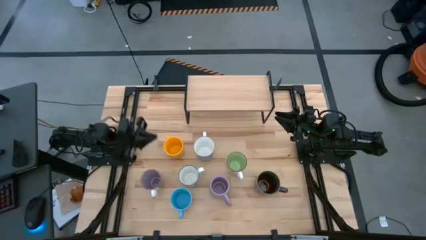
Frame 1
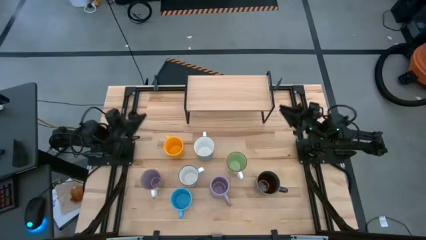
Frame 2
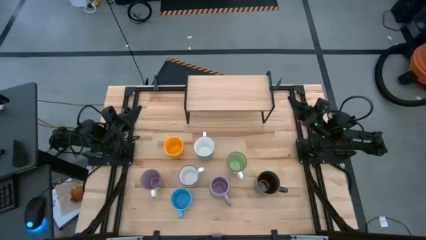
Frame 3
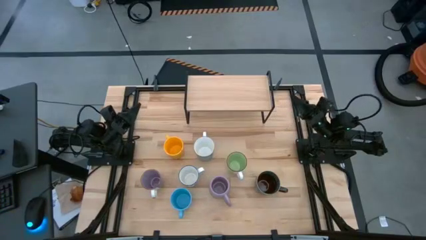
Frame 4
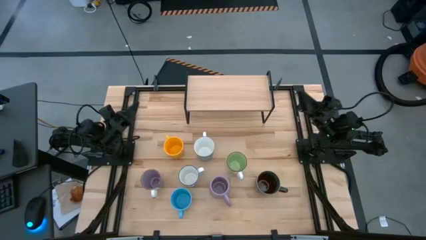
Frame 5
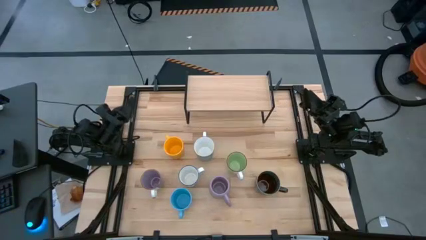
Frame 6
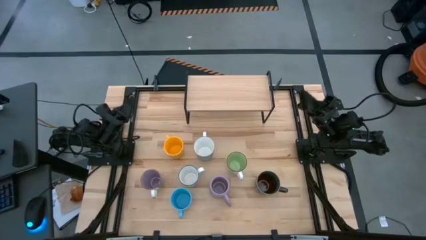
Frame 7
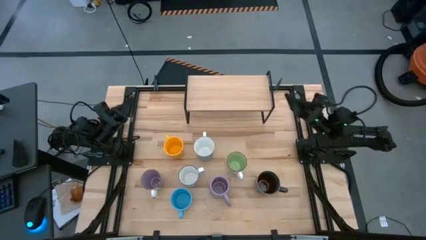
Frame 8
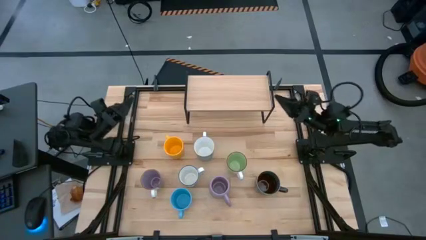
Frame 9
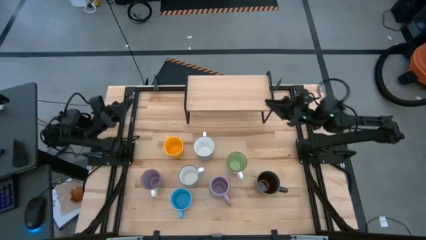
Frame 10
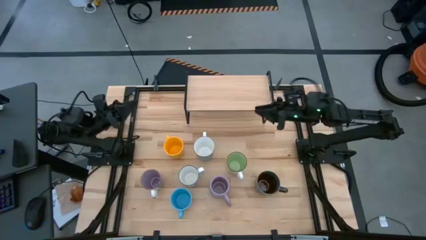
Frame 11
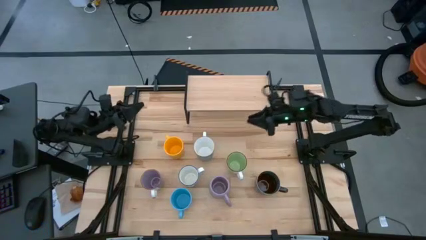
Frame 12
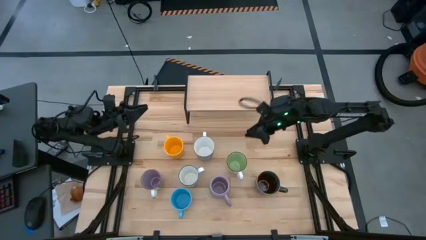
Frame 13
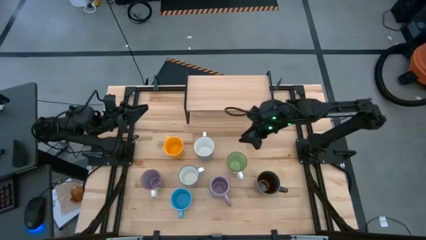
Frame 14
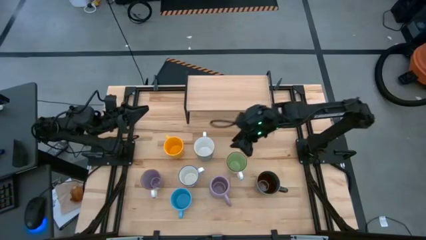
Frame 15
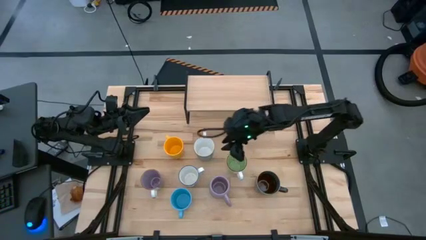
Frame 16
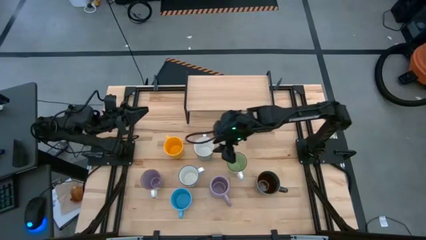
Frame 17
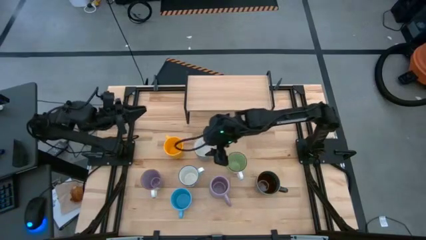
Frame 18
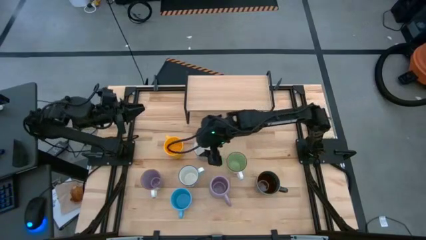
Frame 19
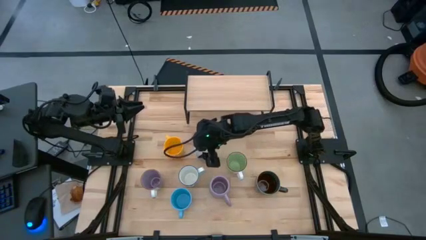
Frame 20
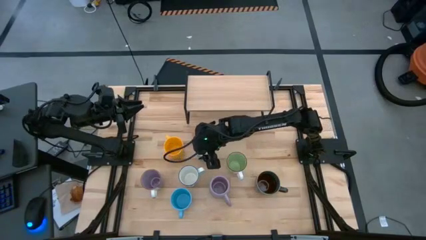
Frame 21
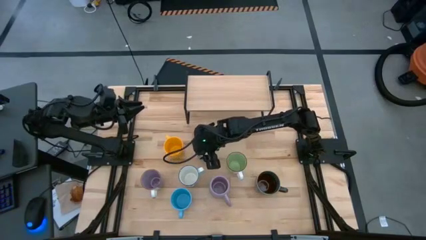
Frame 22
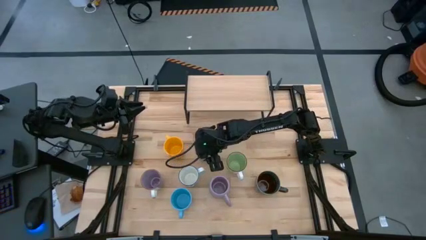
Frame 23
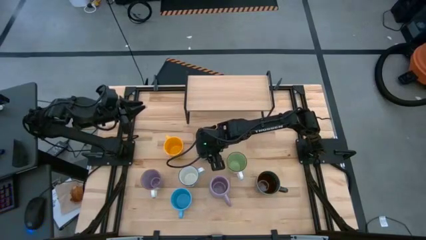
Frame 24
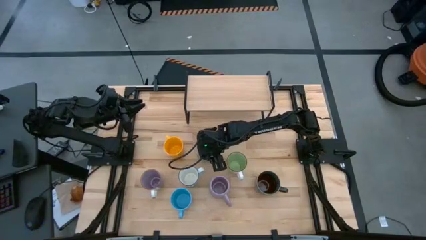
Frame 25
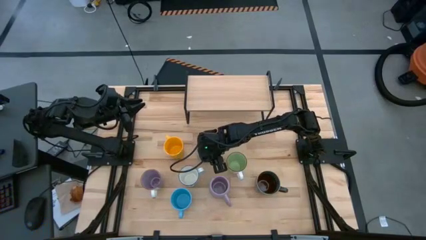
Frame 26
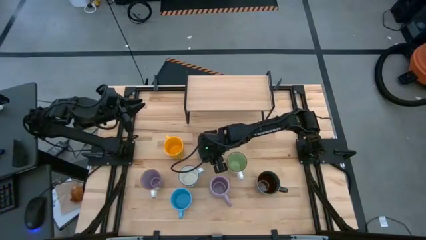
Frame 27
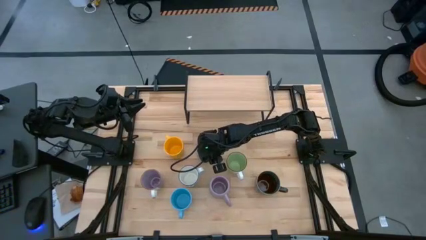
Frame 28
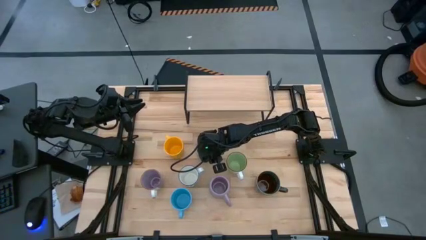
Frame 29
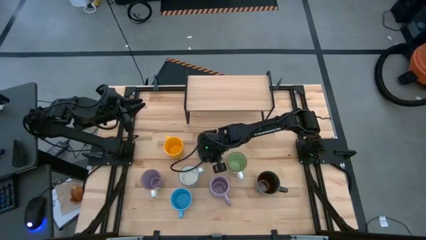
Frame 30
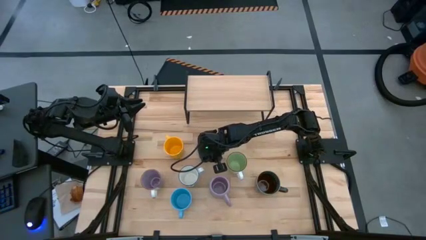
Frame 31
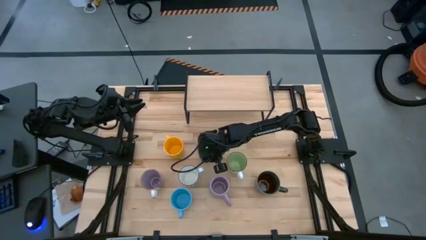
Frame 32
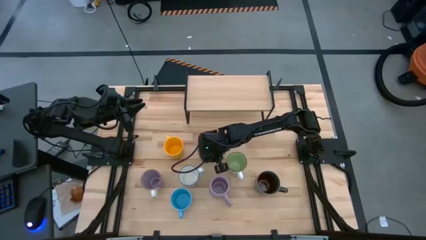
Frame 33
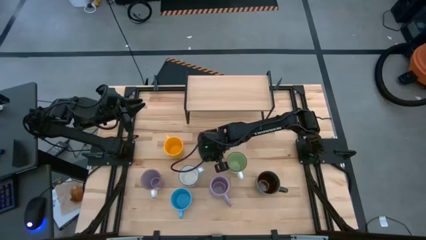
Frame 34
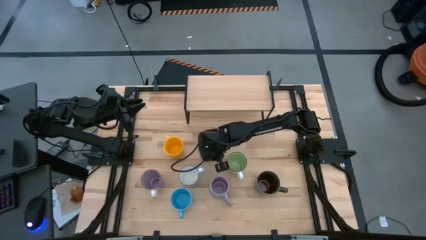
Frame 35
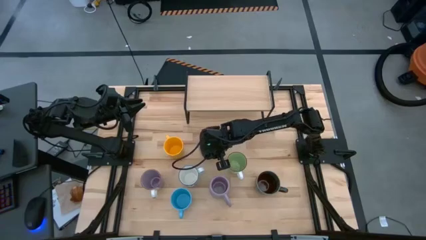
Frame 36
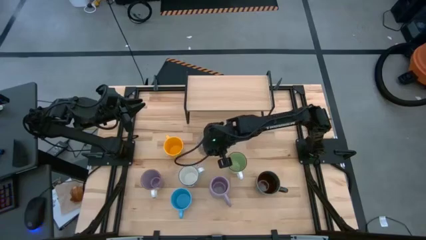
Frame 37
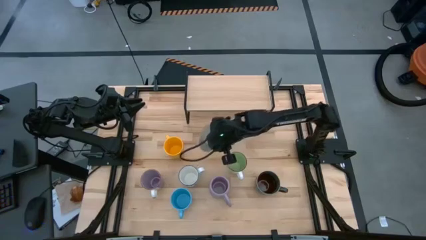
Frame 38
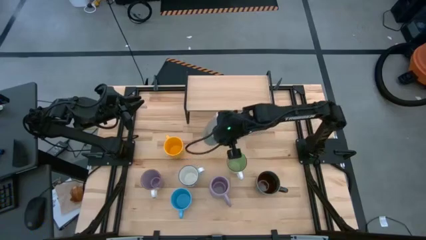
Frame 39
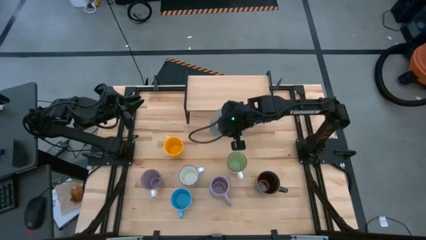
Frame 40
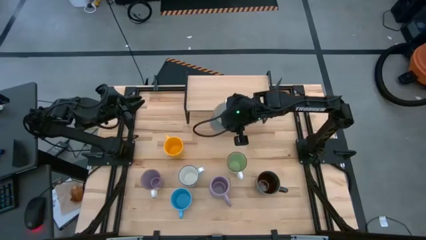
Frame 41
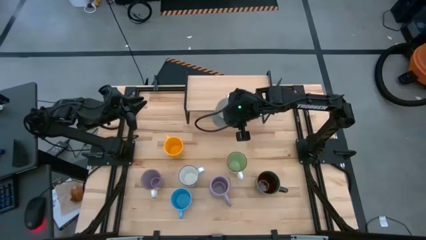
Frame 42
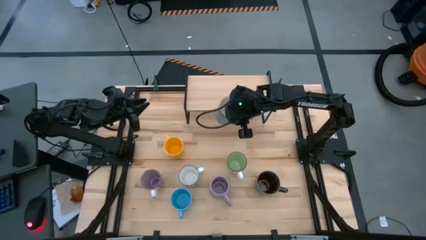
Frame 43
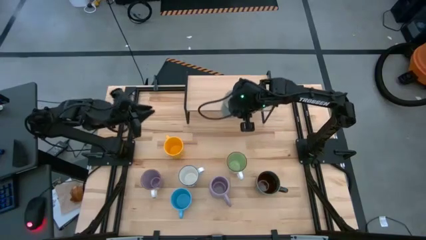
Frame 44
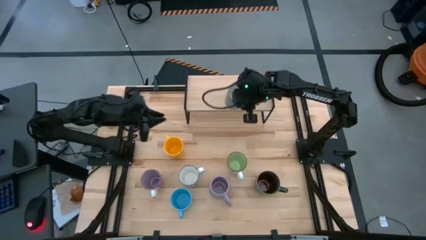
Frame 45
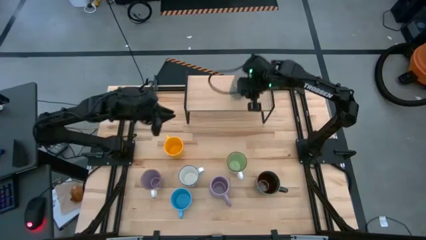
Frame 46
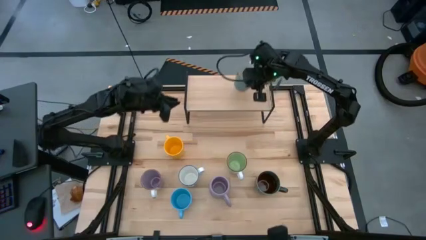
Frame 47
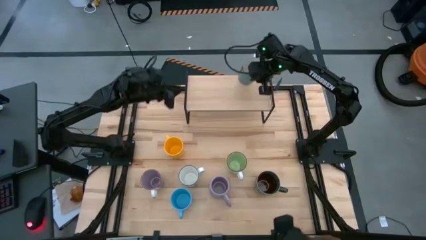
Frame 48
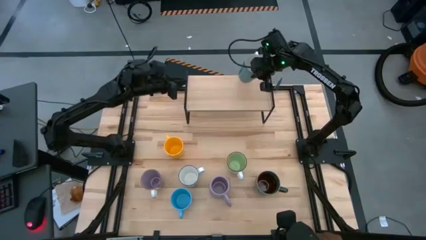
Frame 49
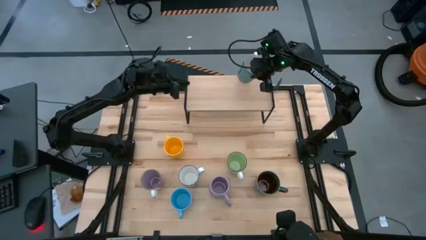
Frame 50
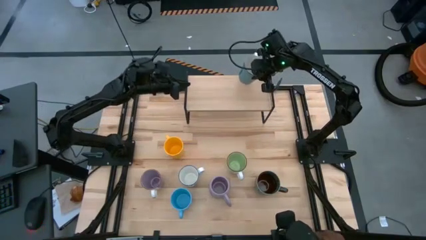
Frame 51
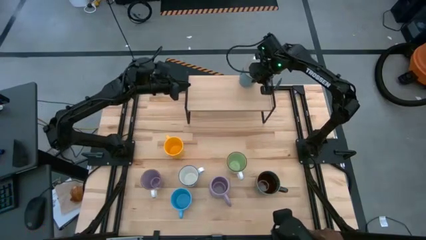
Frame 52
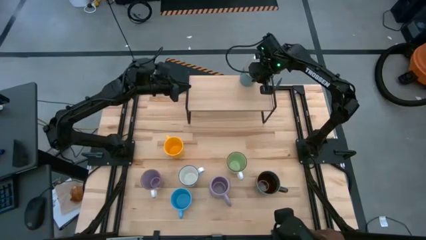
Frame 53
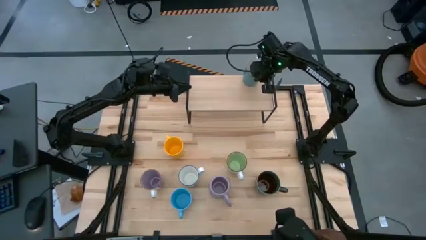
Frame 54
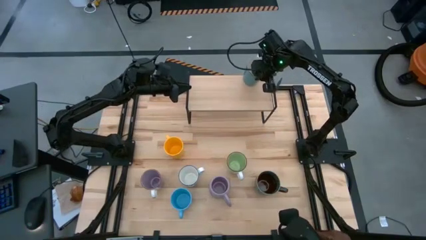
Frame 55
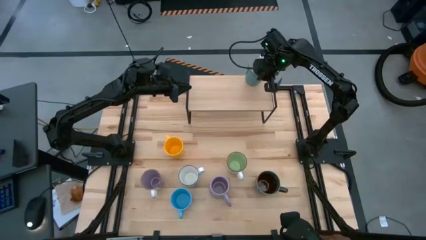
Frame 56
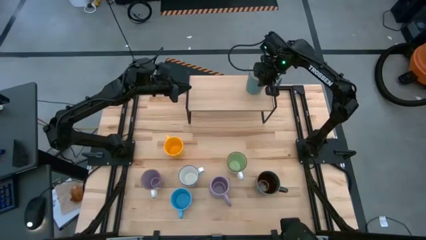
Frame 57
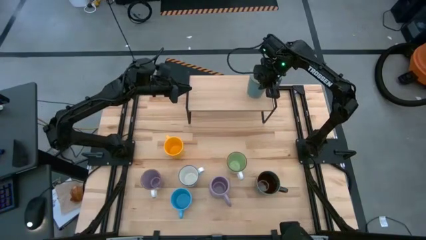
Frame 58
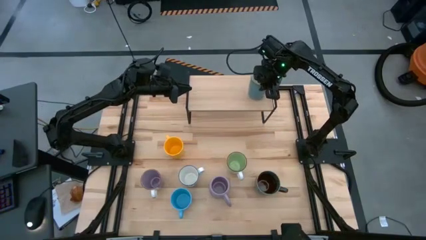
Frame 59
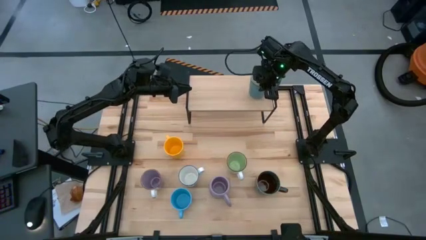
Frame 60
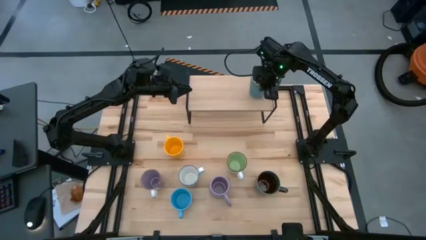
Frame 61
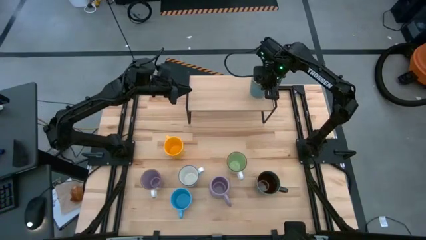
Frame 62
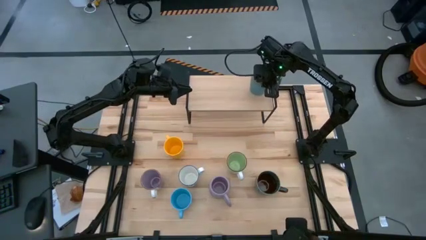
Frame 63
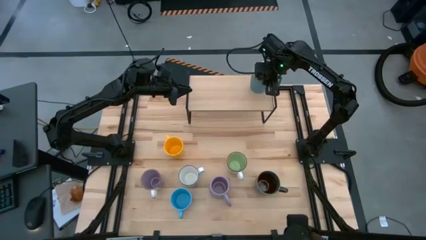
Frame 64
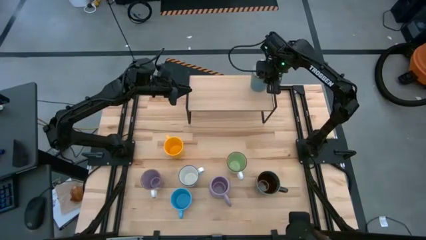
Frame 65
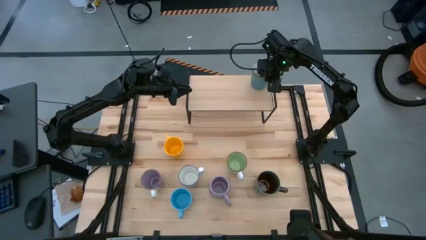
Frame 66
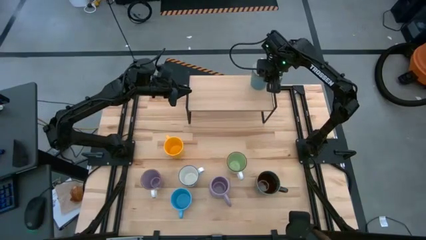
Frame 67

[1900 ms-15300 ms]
Task: Place coffee mugs
Put the top blue mug on the shelf
